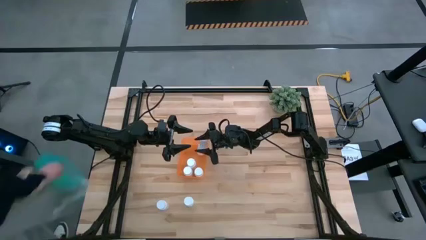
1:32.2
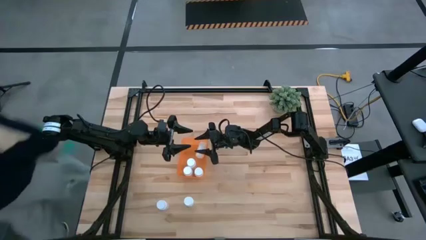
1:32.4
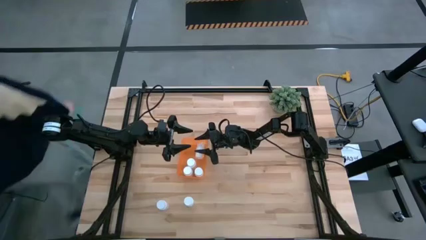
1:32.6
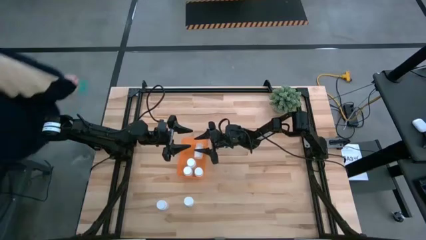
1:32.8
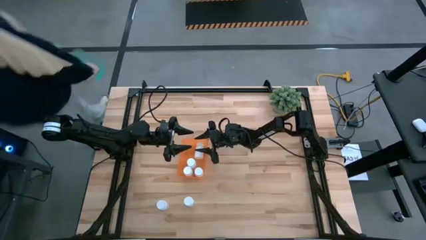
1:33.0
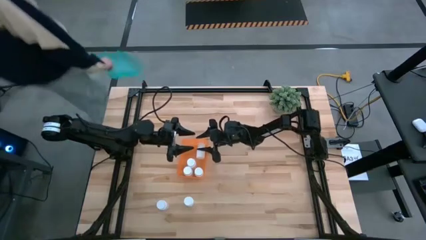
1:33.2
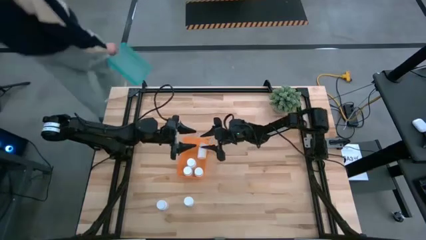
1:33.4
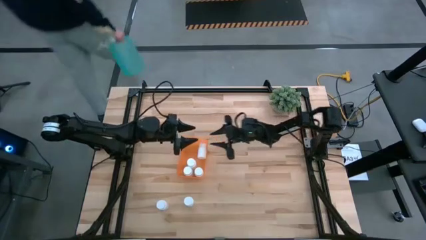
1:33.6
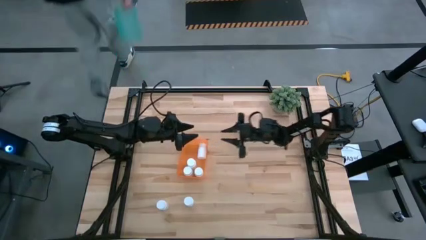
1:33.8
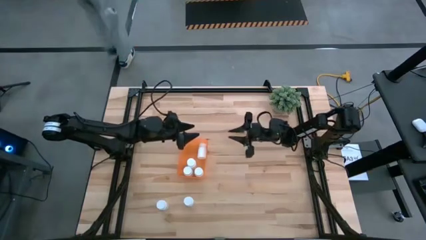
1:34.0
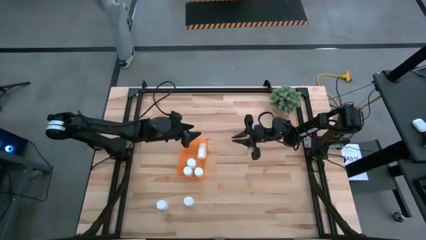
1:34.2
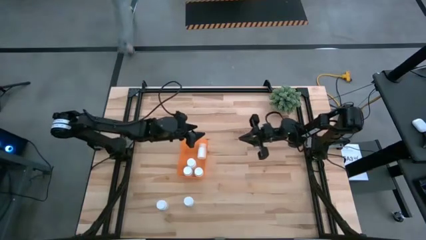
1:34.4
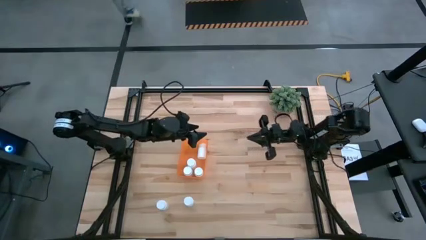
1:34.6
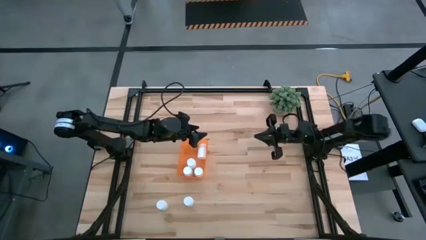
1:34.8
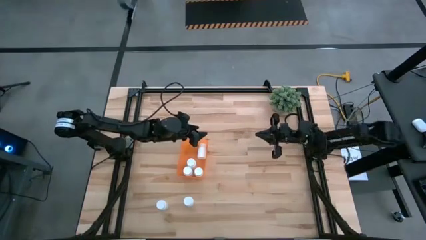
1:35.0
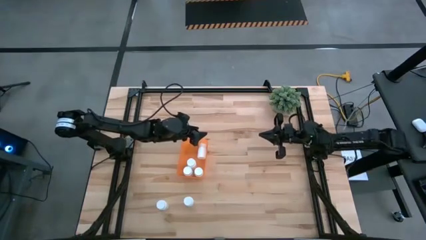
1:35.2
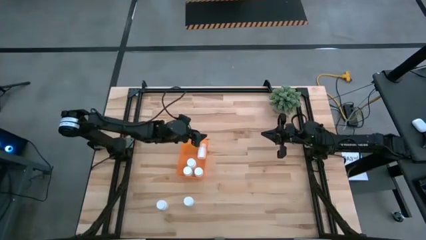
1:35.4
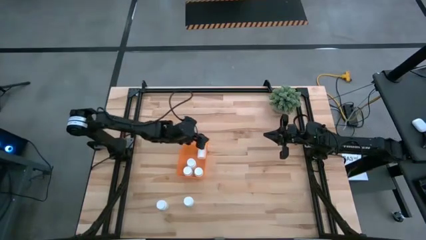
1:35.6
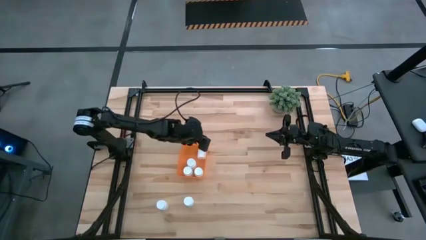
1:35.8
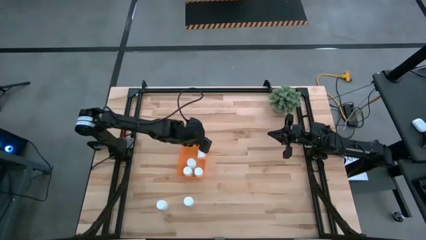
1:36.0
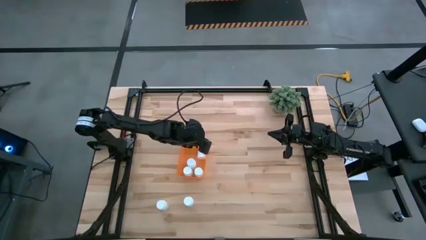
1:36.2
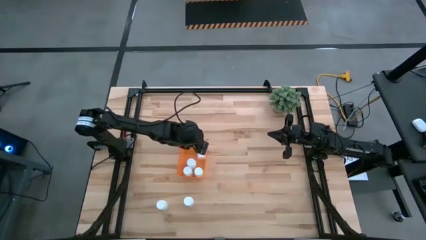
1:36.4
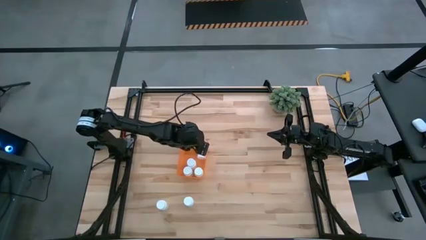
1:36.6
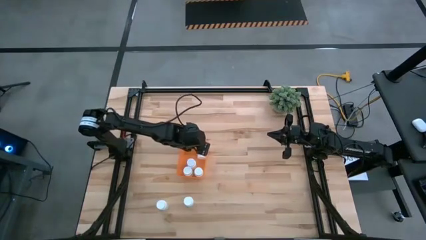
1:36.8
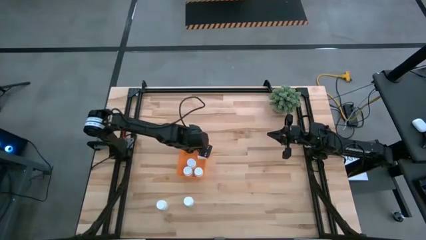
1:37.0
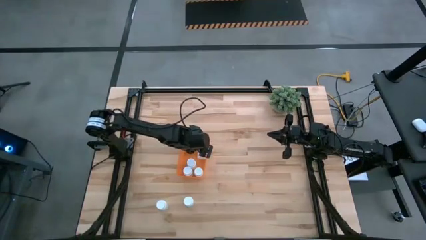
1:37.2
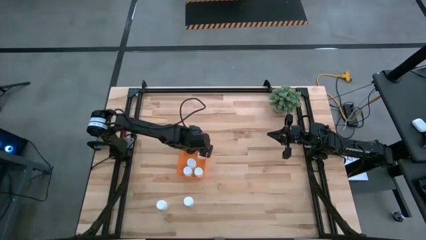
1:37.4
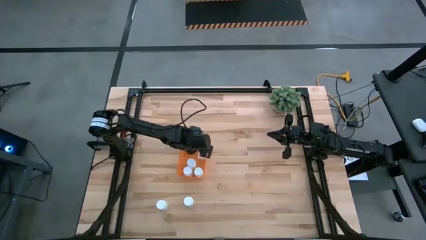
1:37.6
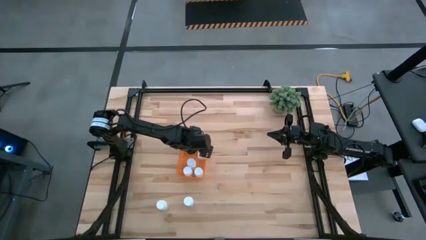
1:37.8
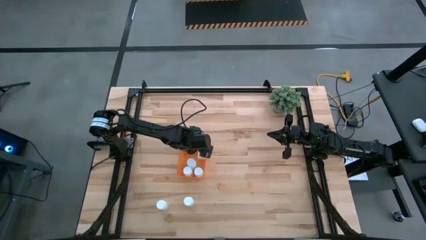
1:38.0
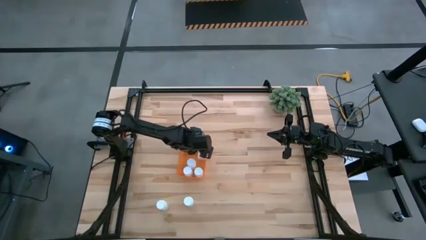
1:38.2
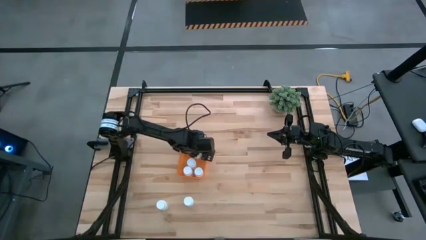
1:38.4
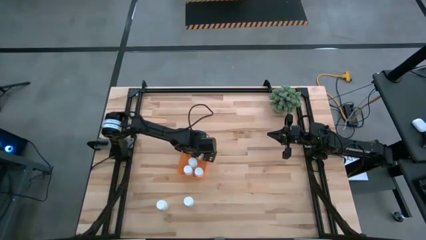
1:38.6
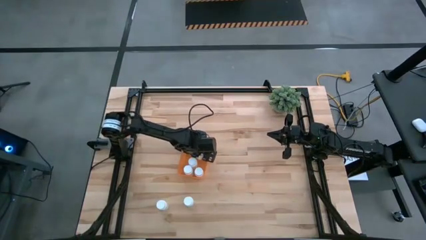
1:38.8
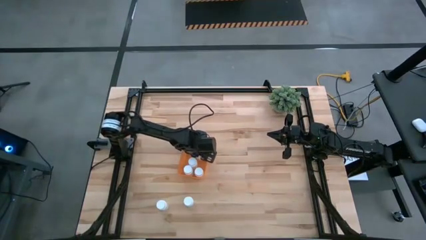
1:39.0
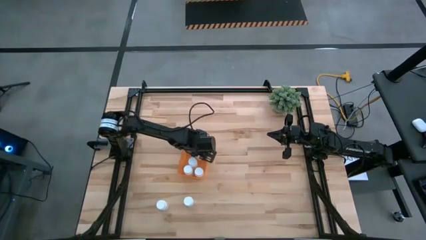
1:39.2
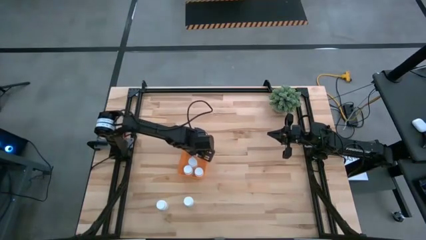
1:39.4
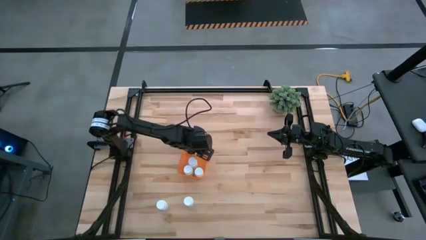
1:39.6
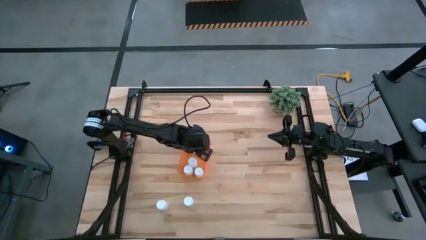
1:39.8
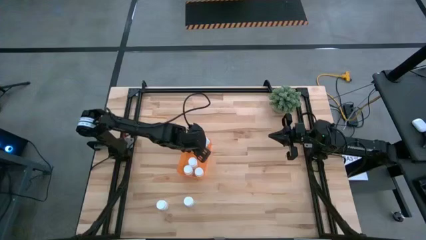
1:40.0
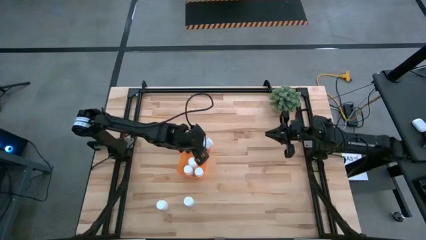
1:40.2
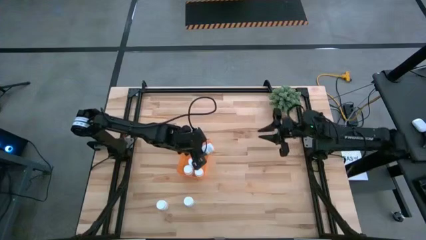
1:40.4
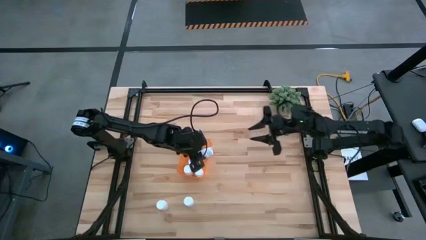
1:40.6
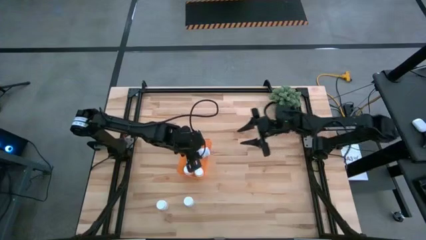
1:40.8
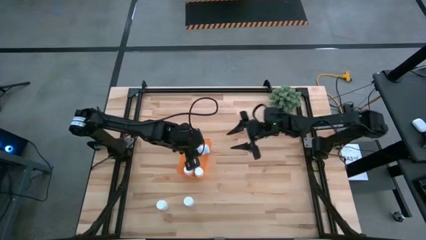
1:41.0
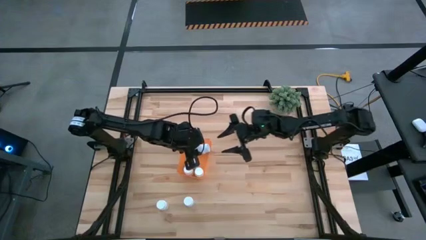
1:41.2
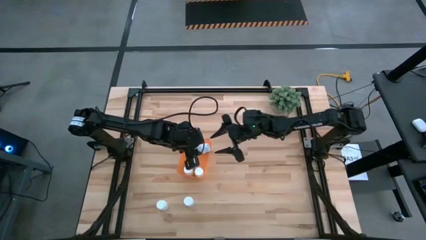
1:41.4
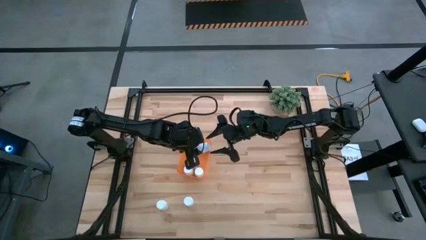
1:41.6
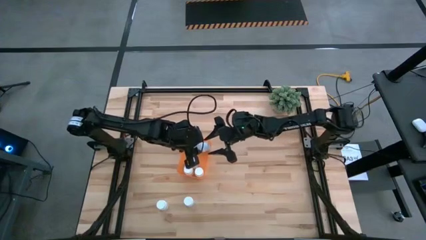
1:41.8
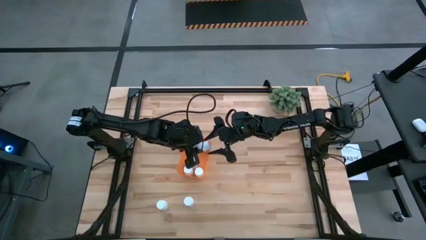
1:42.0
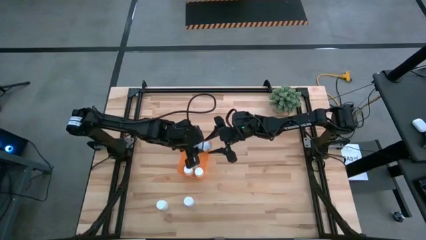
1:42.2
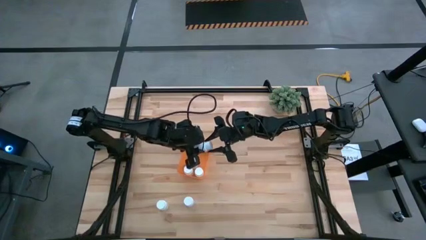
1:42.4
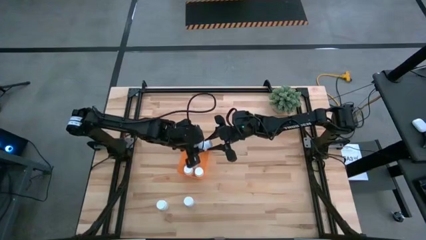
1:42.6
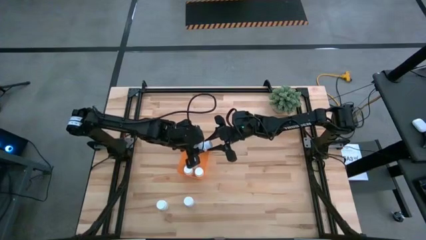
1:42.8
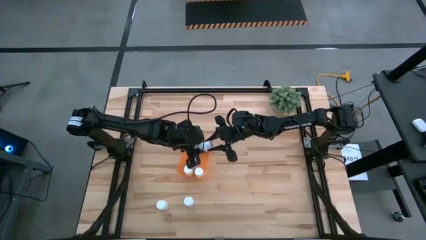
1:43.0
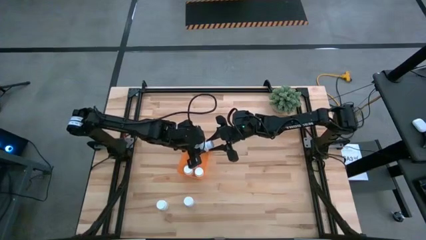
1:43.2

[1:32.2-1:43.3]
Task: Pick and place pill bottles into a basket
Put the top right white medicine bottle into the orange bin
